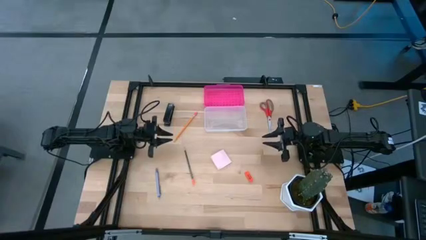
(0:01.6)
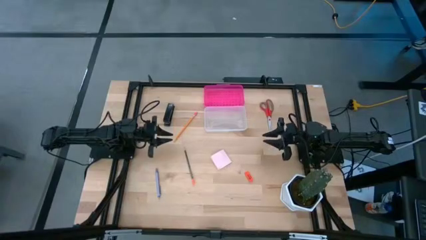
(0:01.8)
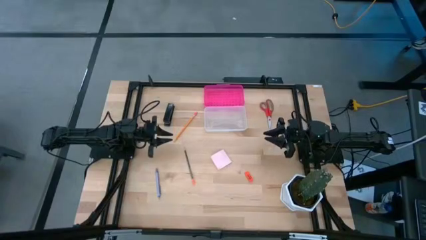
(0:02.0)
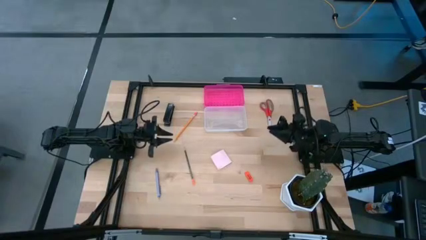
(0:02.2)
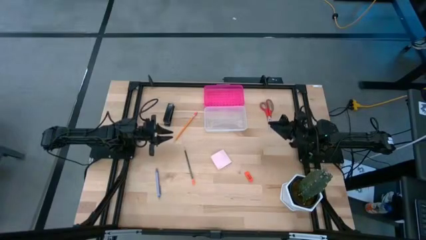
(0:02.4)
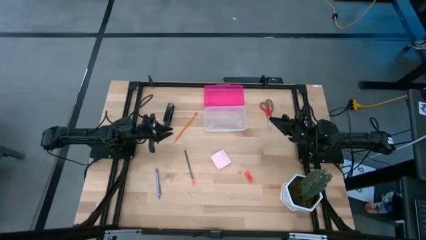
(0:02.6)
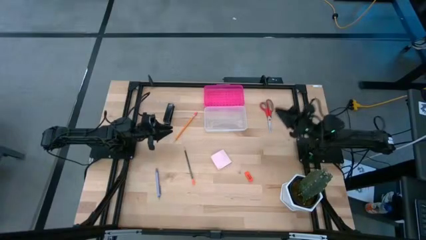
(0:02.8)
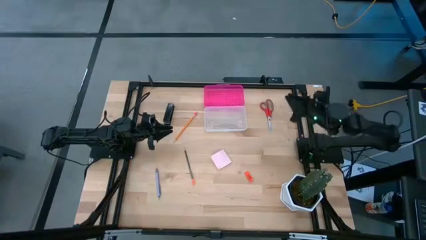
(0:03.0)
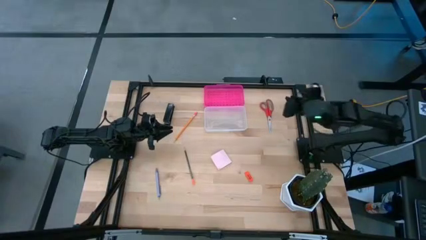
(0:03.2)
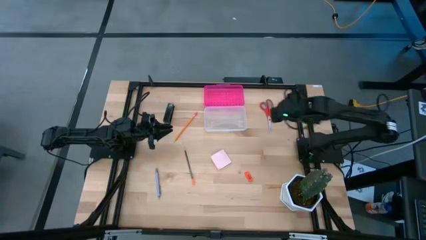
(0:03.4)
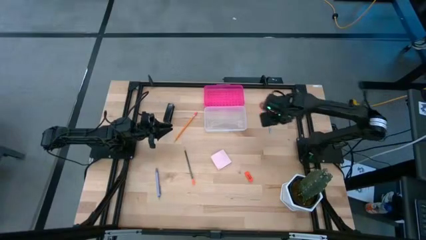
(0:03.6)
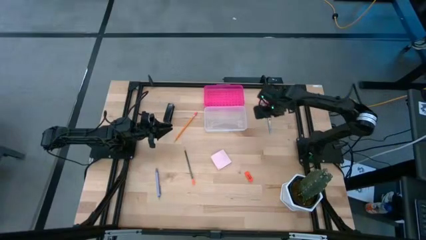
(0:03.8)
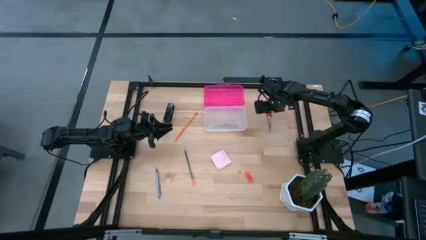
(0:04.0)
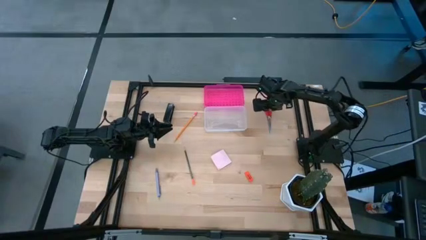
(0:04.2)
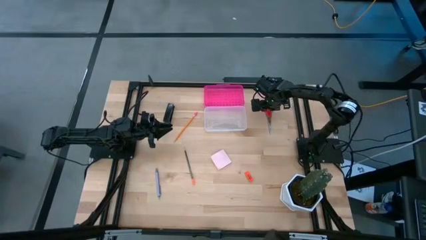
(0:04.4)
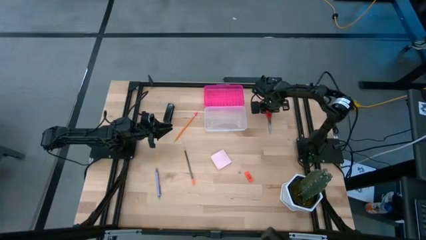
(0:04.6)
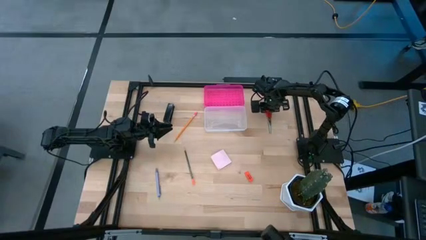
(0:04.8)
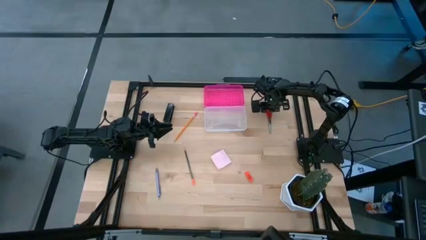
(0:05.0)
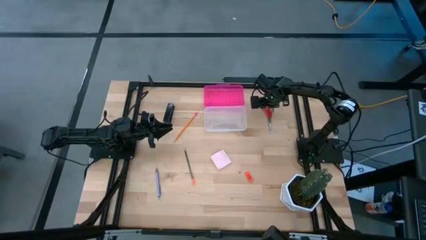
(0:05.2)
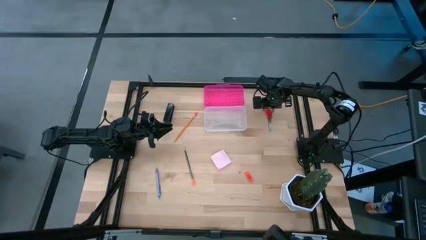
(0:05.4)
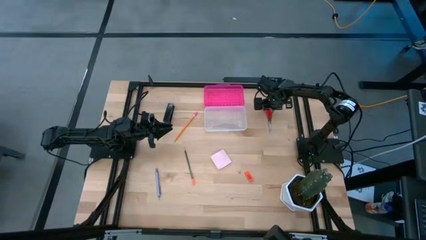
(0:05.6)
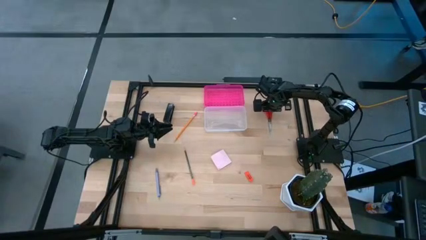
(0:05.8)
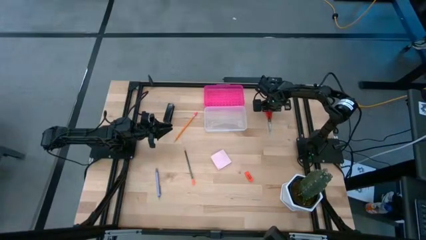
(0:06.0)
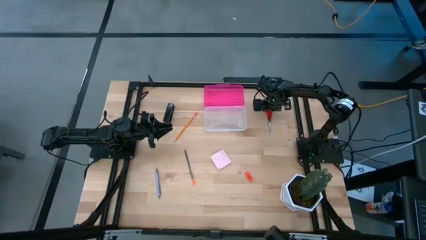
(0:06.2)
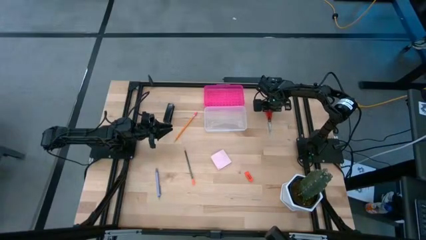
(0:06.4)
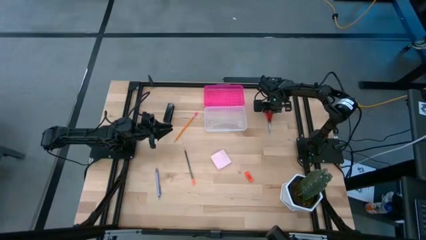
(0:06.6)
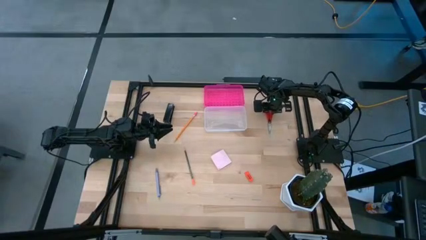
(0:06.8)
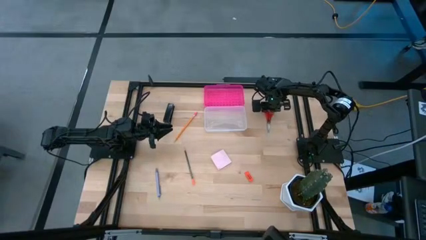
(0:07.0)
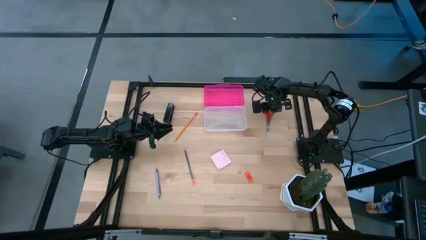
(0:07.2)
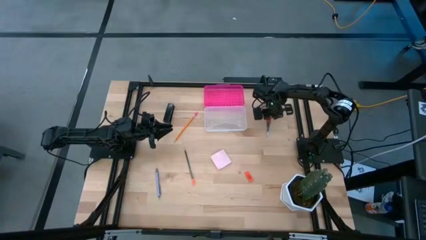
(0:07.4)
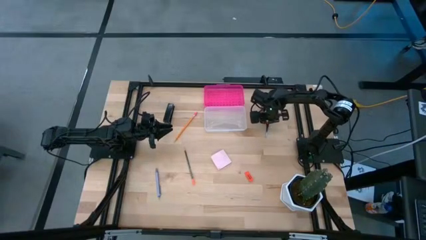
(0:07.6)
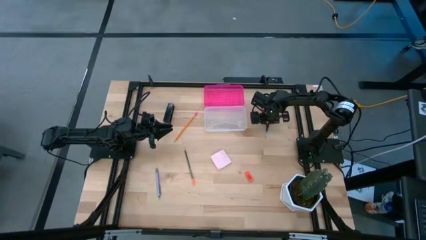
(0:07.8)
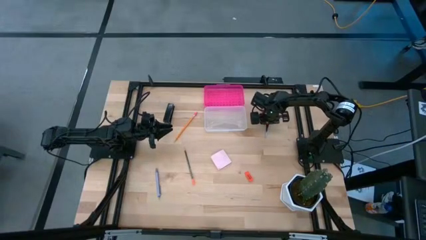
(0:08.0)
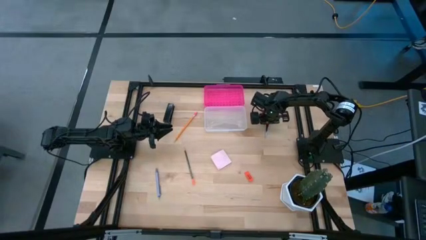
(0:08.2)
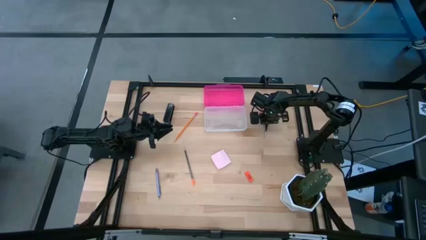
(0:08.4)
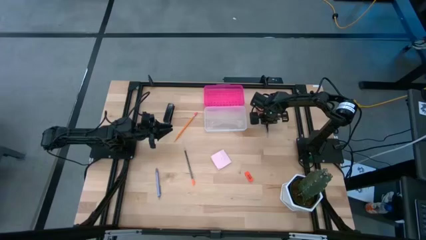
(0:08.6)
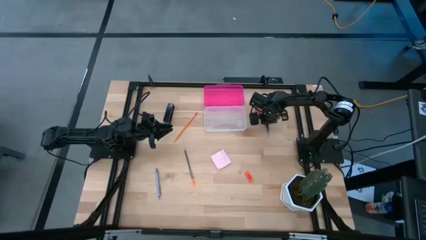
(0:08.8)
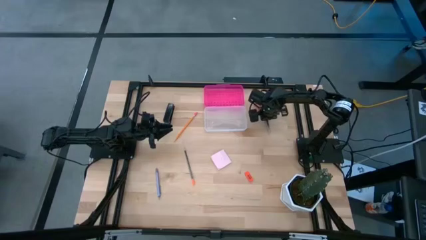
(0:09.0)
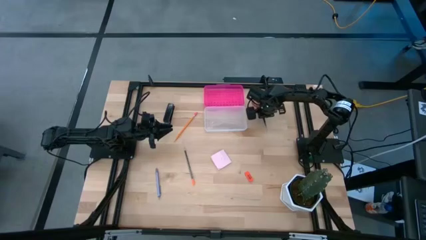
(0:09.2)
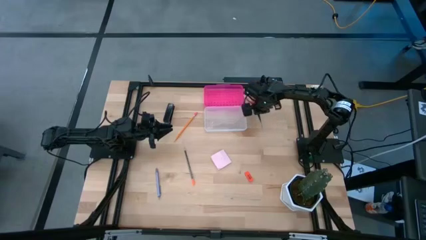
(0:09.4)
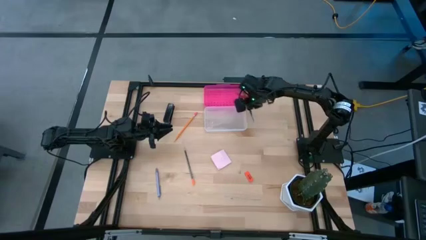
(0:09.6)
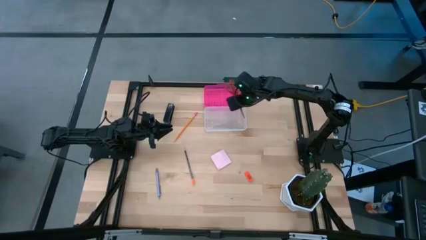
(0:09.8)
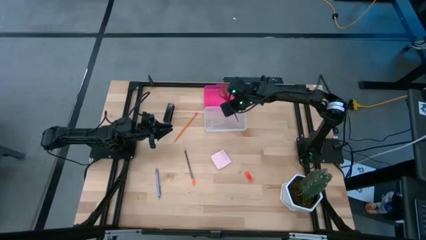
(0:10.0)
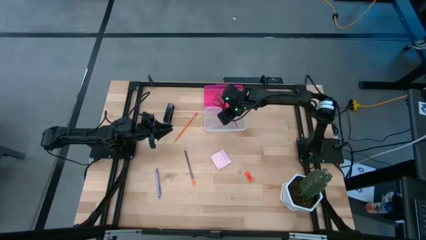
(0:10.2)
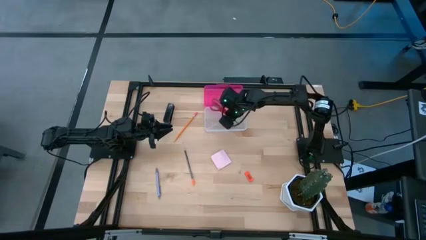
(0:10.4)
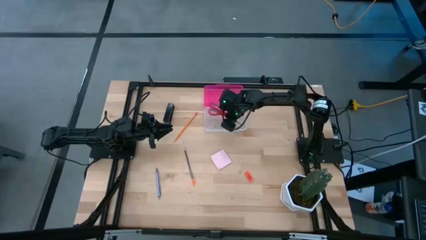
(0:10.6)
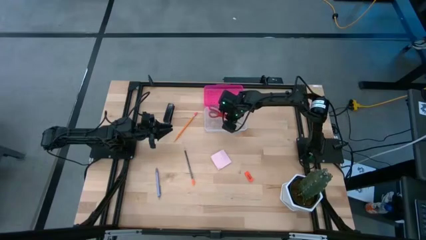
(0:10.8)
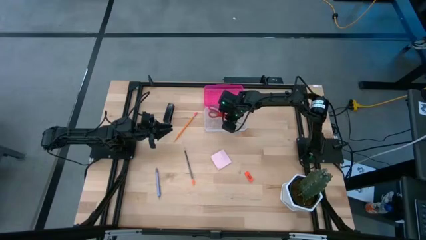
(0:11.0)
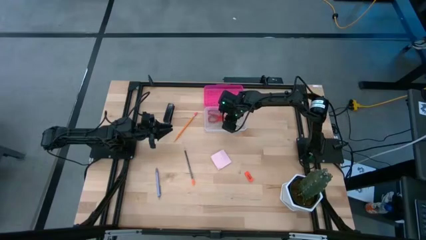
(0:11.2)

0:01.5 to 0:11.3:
Task: Pack school essentials
Put the red scissors into the supply box

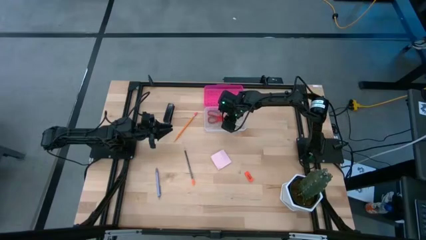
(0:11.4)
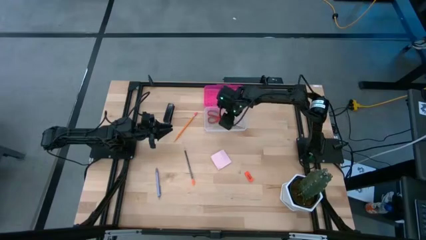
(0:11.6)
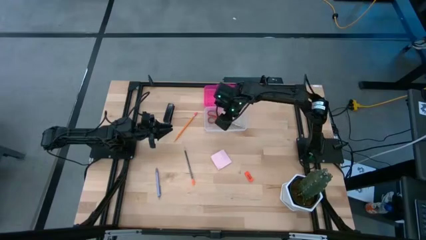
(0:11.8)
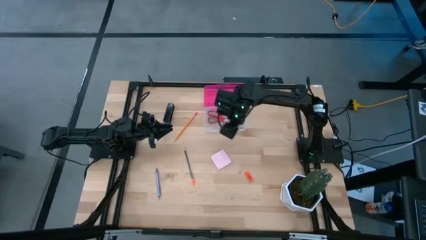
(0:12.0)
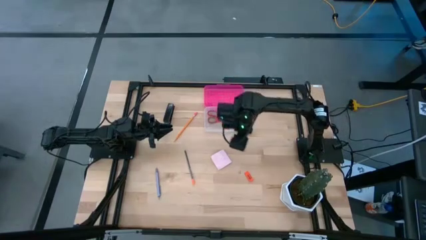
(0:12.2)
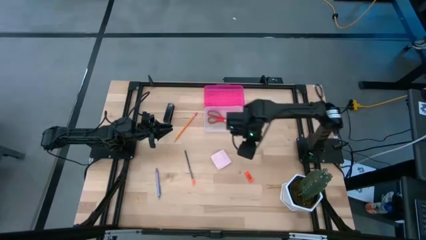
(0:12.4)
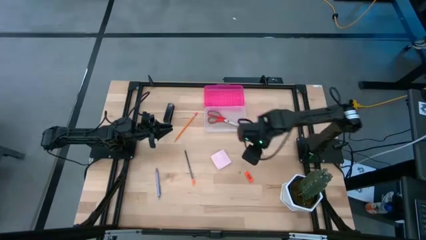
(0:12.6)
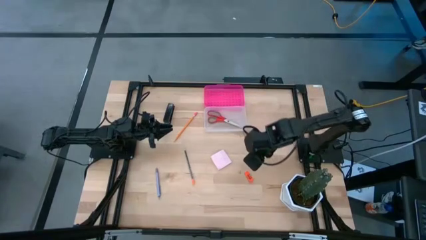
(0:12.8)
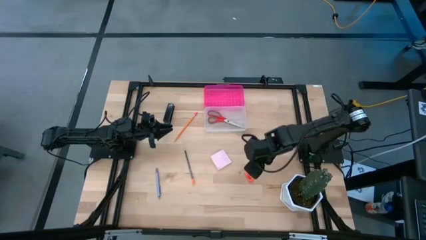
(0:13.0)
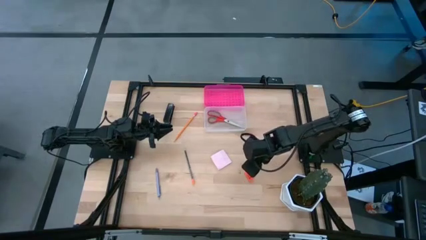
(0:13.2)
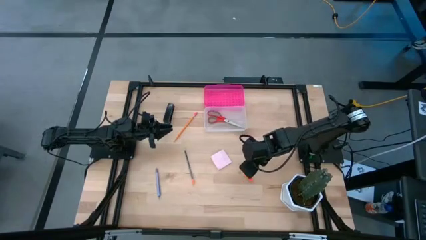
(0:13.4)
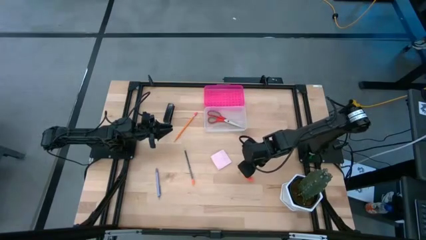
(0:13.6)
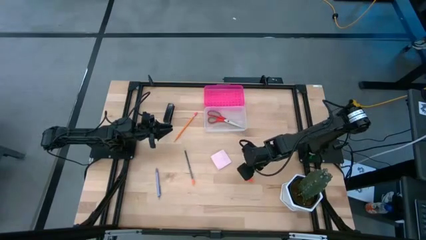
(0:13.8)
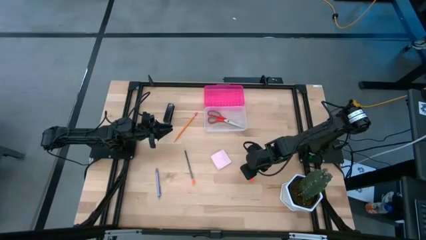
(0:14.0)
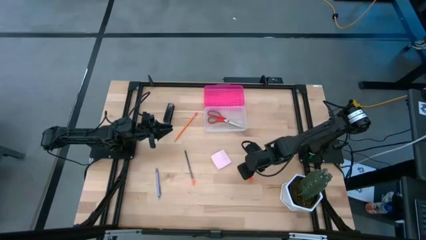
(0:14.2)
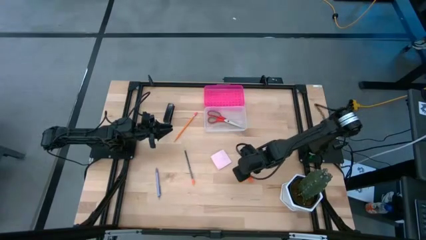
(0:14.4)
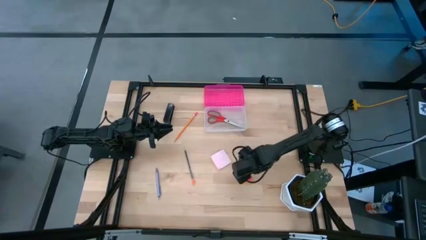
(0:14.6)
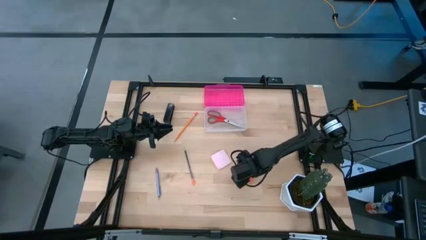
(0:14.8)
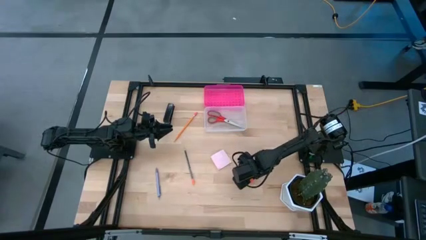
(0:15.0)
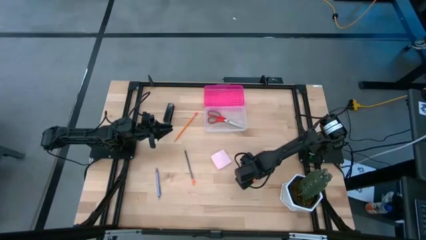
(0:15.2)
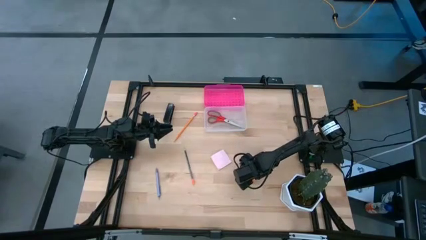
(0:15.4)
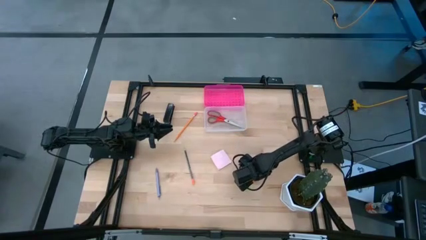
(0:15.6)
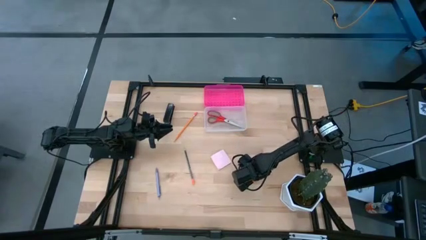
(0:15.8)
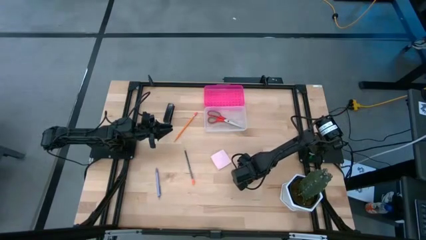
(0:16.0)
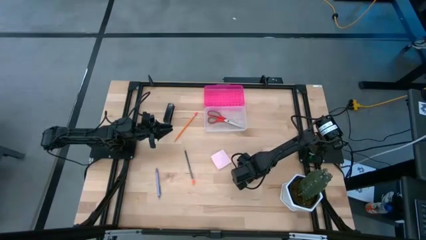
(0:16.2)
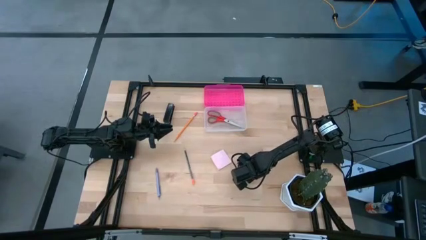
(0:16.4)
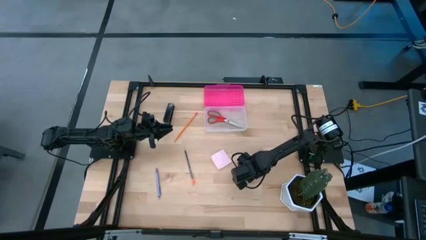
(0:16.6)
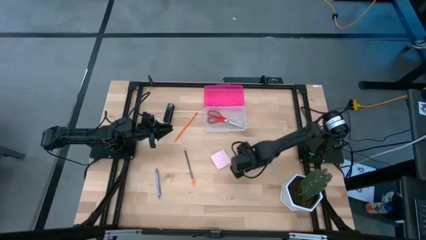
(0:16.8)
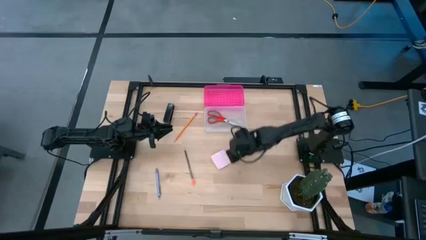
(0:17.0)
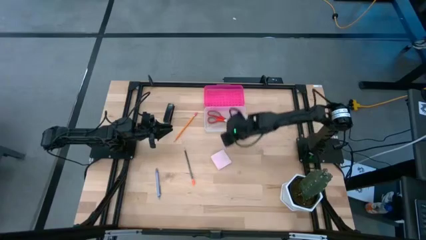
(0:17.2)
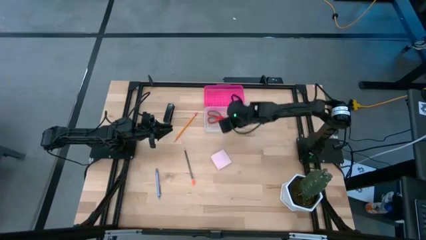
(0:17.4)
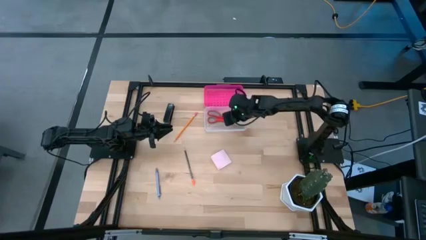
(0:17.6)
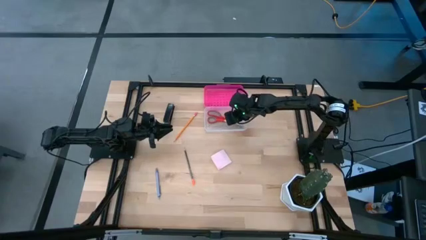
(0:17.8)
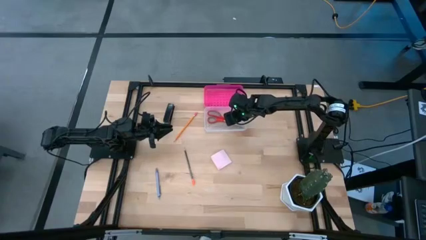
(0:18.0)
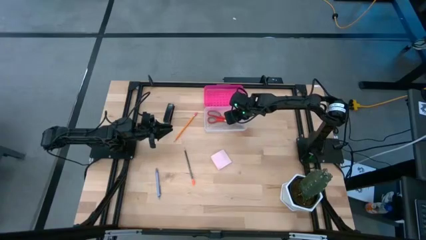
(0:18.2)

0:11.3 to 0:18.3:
Put the orange eraser into the supply box
